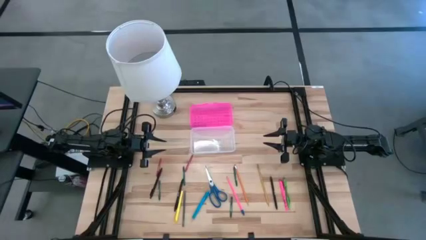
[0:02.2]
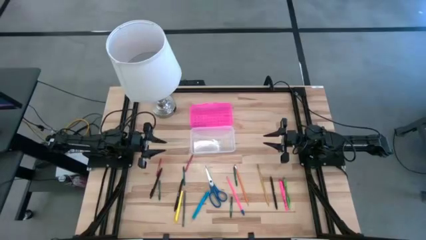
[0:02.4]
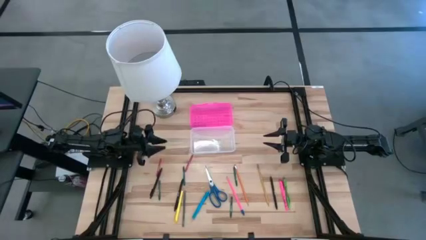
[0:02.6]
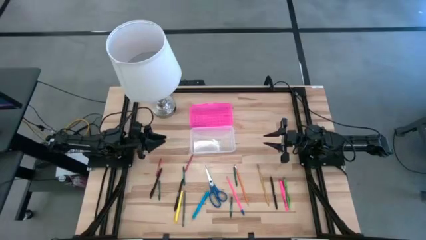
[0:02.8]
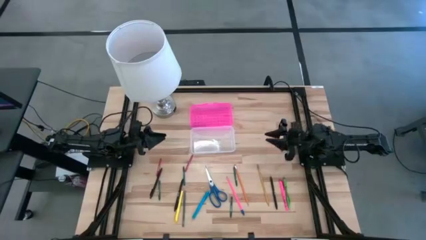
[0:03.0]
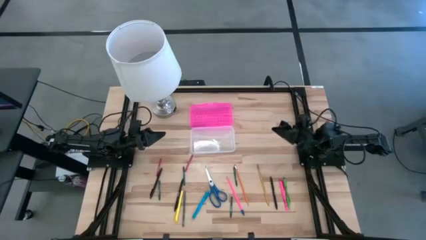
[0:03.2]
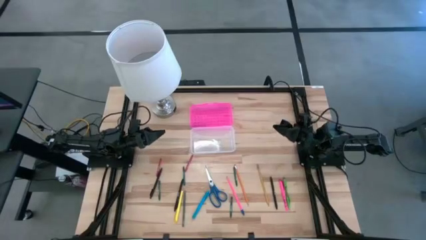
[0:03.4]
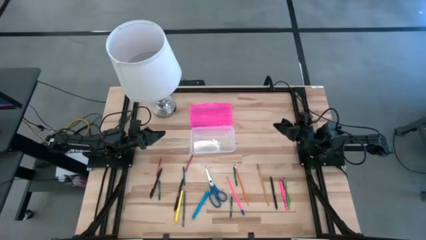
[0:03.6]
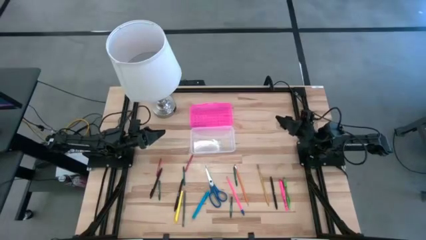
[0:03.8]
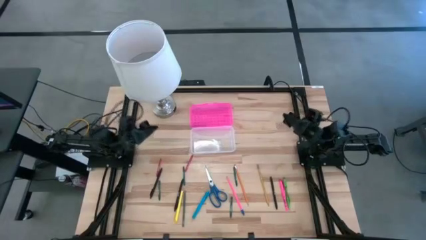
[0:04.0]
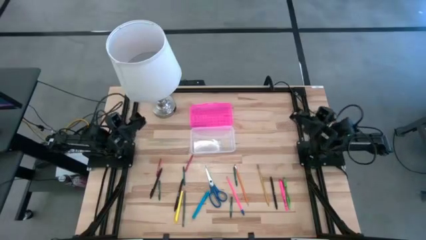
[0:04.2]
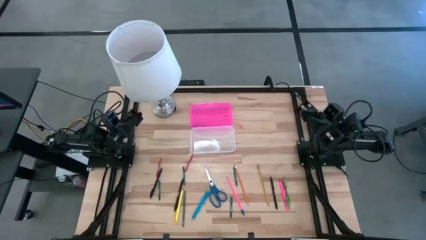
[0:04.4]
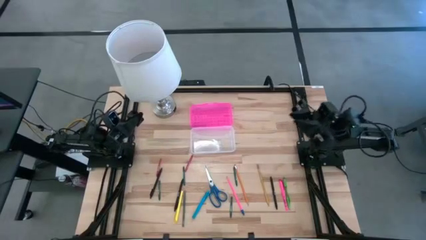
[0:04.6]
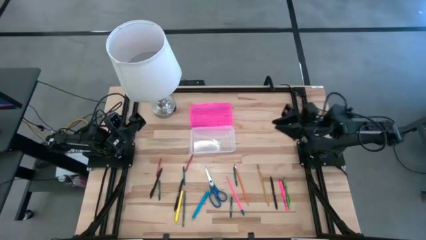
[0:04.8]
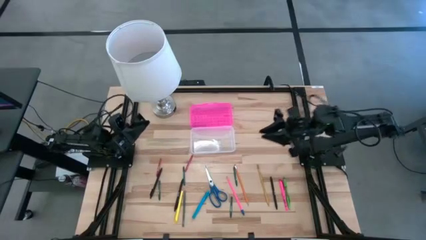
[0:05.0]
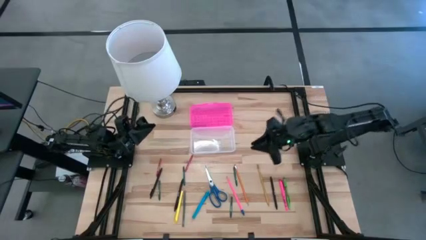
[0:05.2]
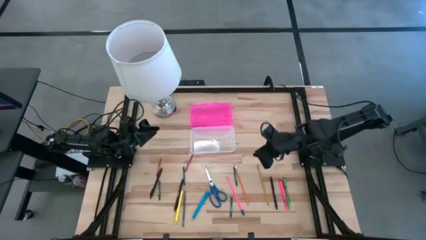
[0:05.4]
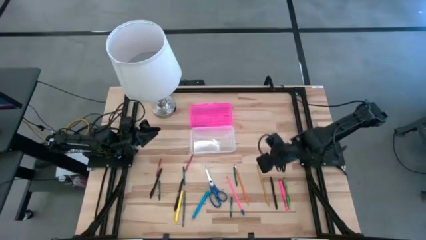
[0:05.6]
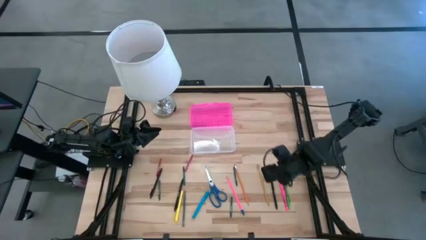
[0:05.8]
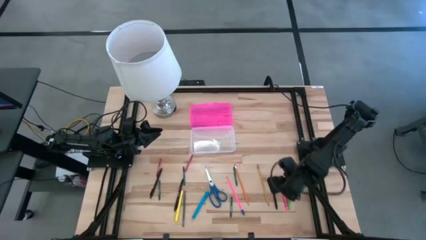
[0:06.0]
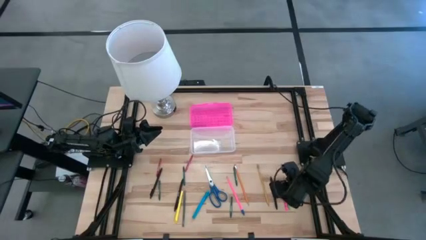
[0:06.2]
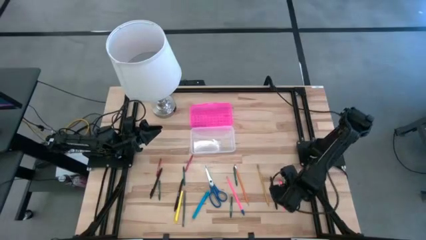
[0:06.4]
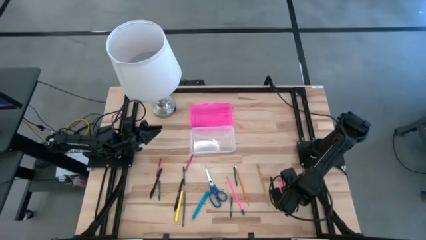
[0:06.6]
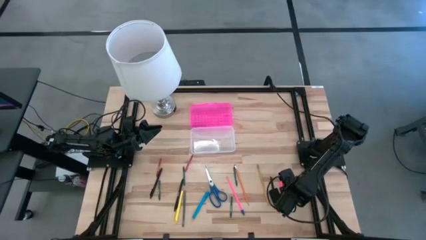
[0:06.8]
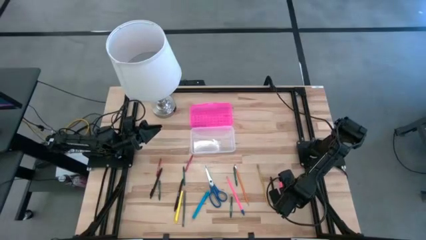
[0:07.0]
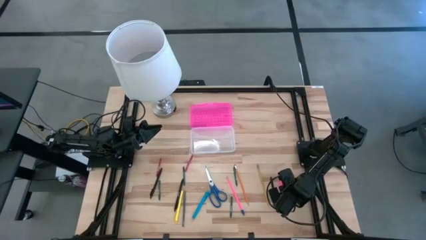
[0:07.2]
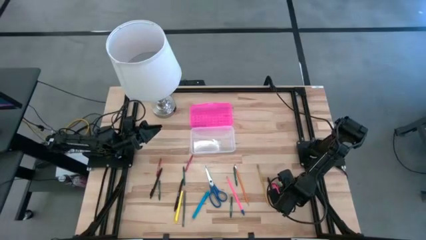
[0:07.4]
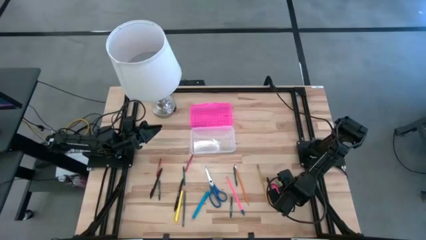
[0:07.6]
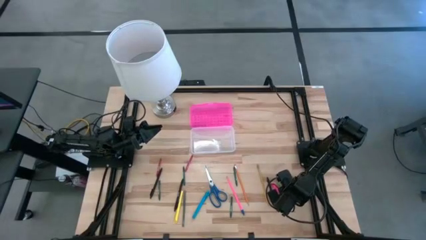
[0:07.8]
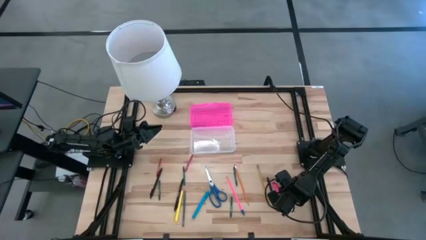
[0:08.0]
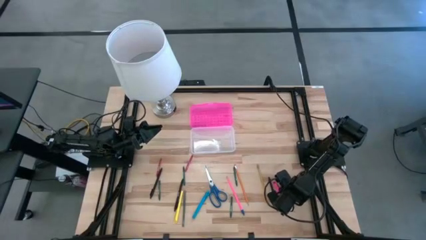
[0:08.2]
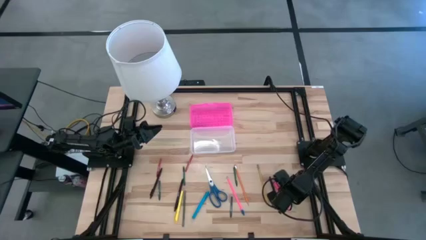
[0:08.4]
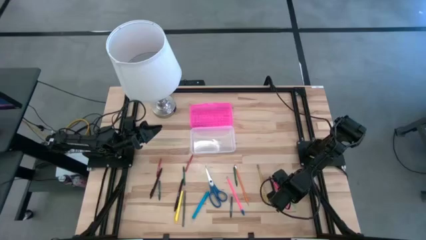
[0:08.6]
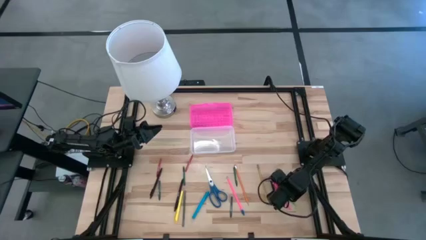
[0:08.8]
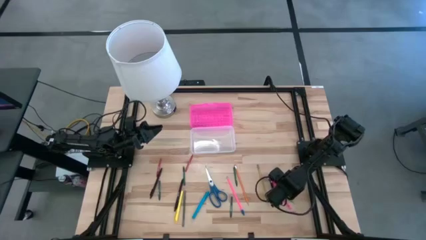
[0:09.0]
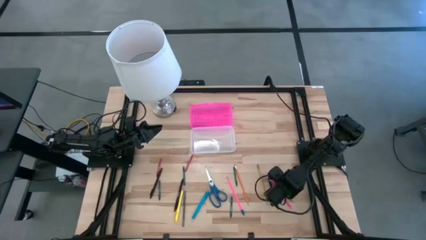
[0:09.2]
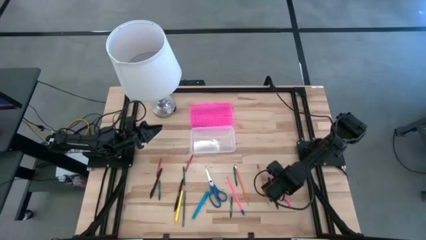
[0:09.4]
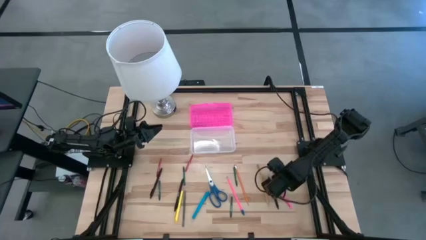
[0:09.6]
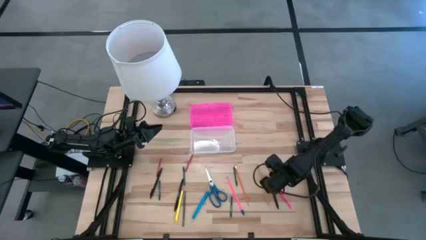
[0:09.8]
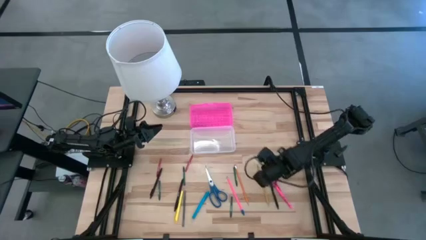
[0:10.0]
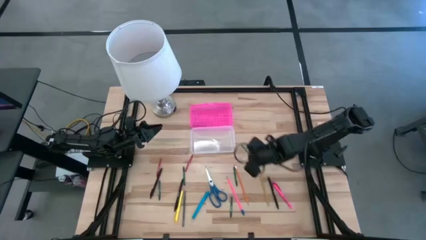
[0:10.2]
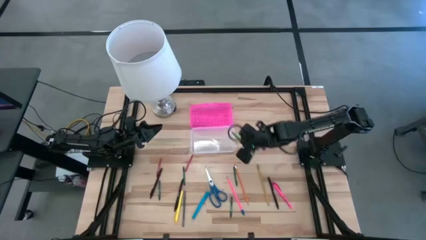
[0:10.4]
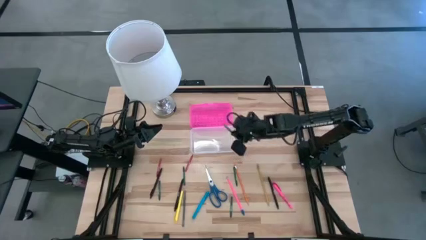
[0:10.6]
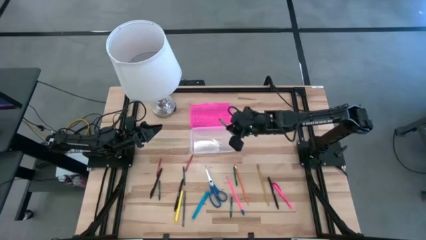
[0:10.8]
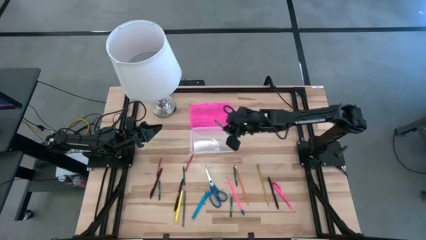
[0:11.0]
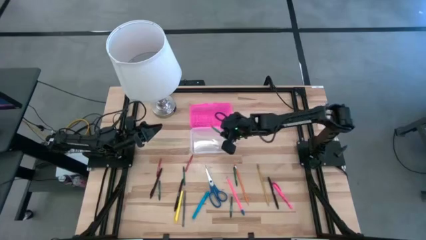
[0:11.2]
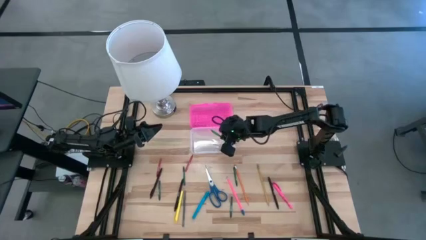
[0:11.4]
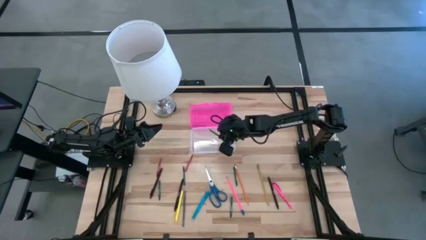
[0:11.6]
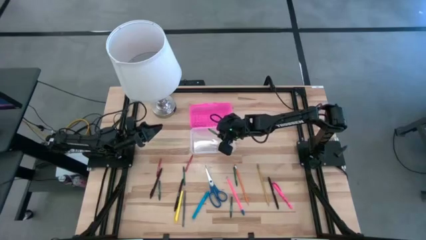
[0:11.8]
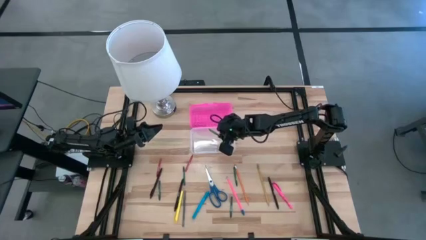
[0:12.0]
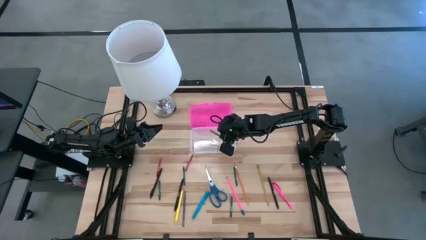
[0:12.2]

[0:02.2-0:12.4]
Task: Pick & place school supplies into a supply box
Put the green pen into the supply box

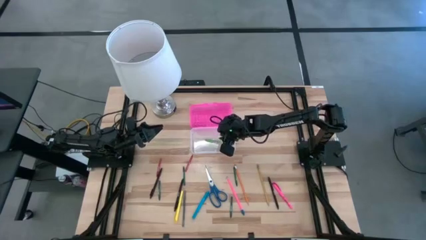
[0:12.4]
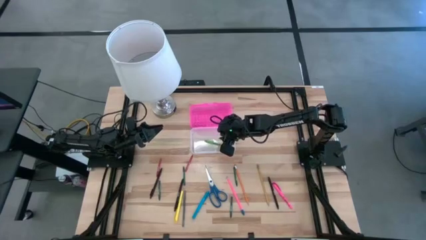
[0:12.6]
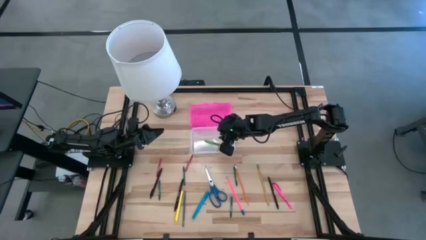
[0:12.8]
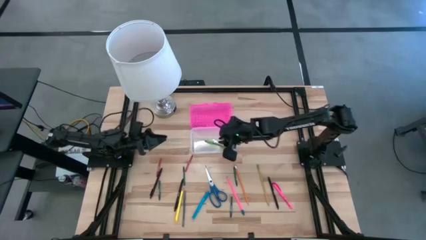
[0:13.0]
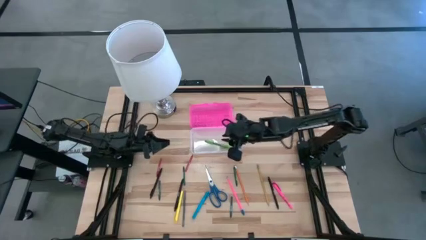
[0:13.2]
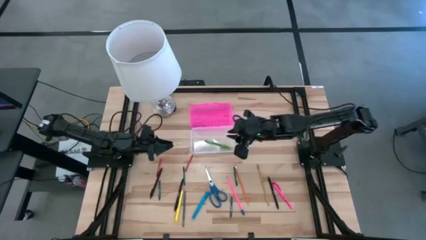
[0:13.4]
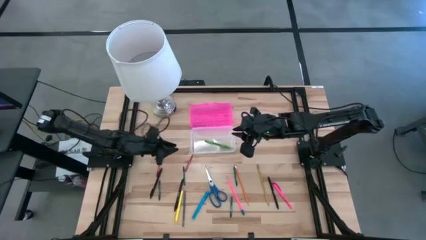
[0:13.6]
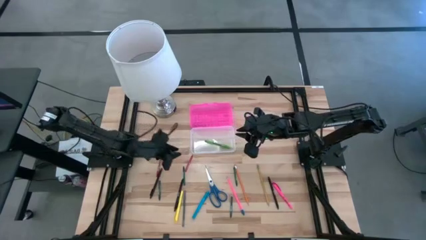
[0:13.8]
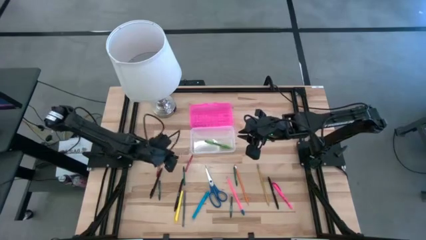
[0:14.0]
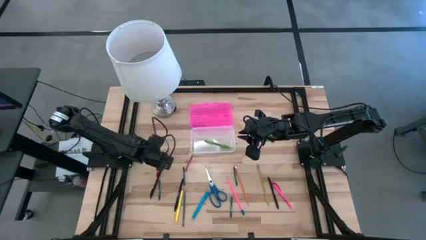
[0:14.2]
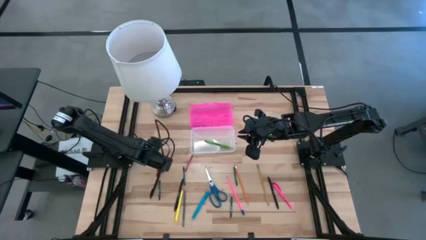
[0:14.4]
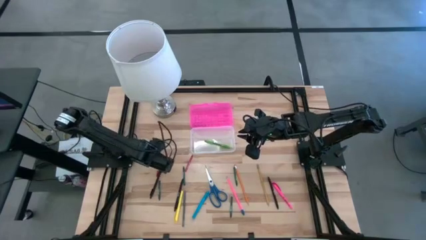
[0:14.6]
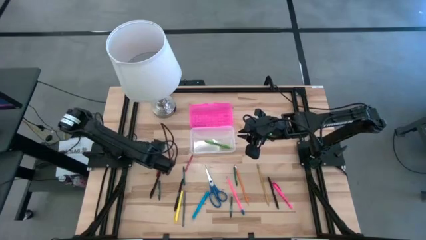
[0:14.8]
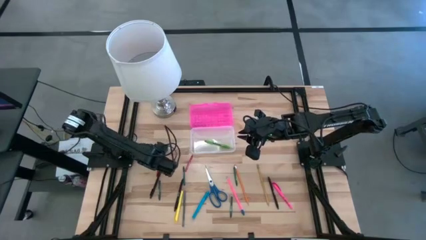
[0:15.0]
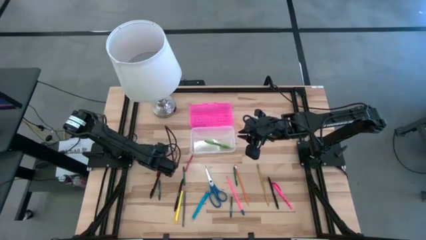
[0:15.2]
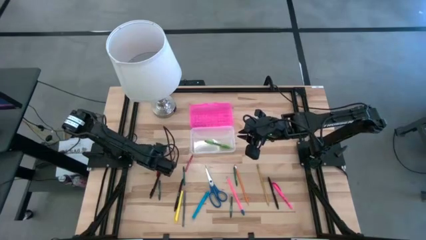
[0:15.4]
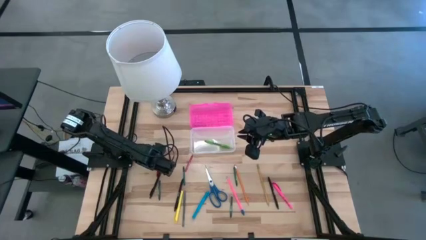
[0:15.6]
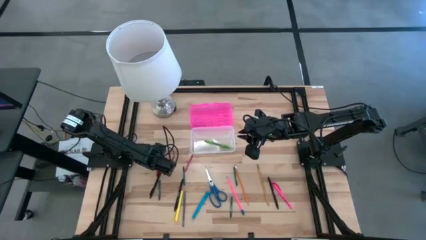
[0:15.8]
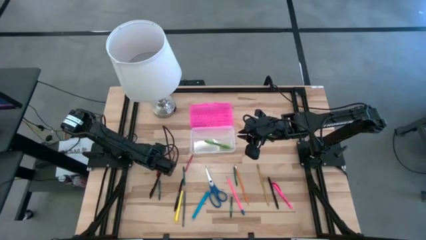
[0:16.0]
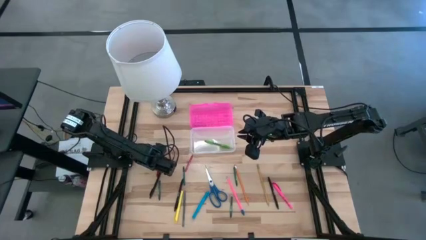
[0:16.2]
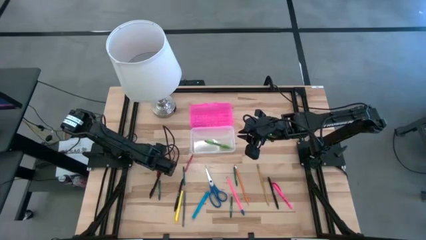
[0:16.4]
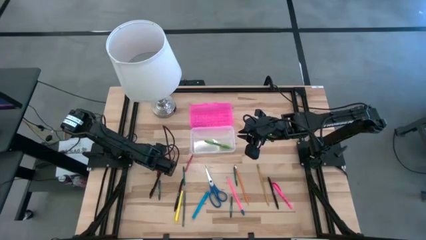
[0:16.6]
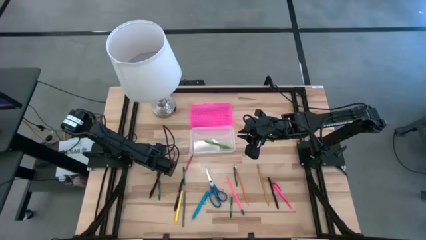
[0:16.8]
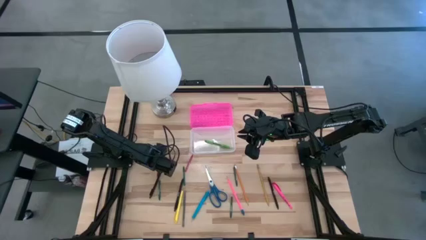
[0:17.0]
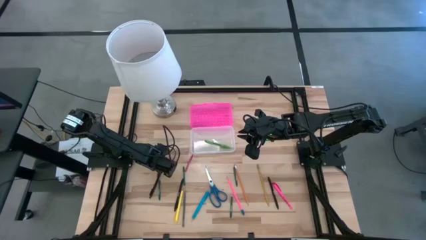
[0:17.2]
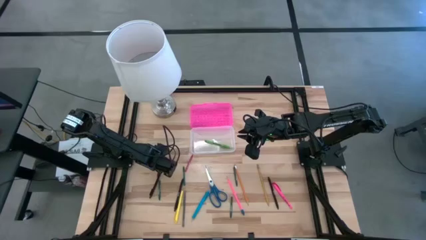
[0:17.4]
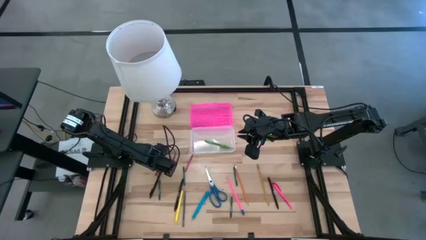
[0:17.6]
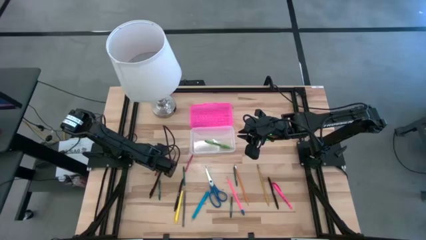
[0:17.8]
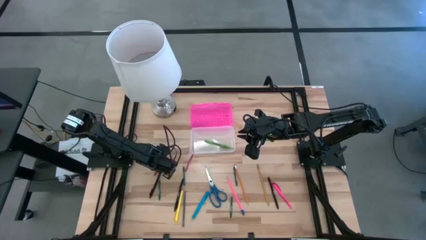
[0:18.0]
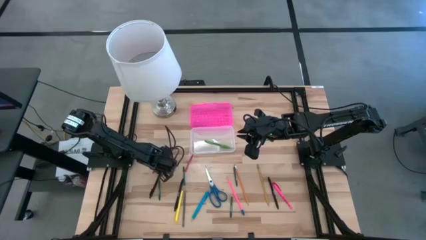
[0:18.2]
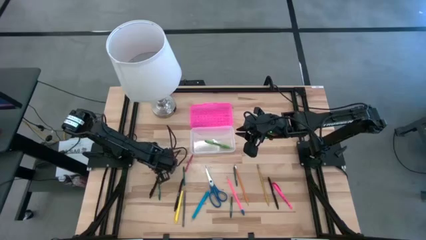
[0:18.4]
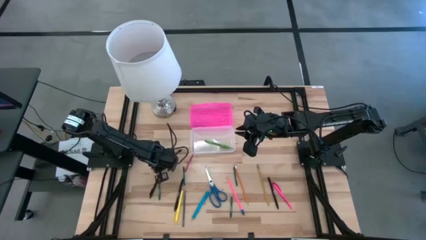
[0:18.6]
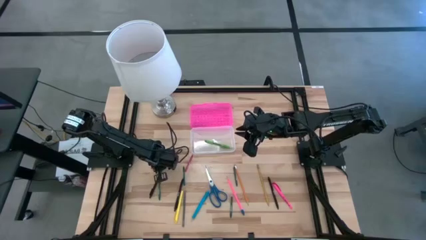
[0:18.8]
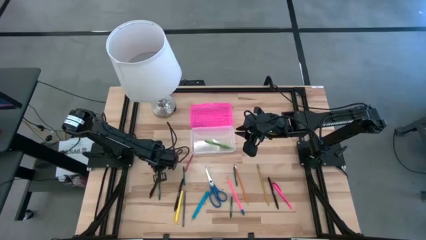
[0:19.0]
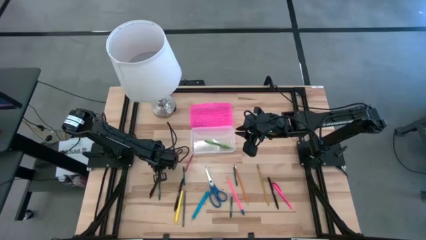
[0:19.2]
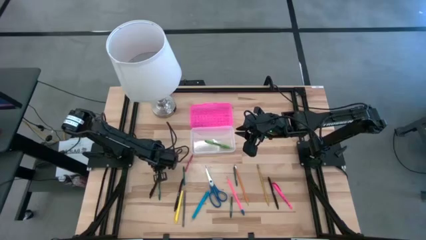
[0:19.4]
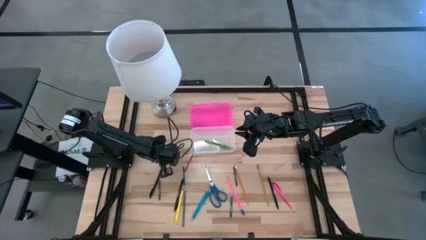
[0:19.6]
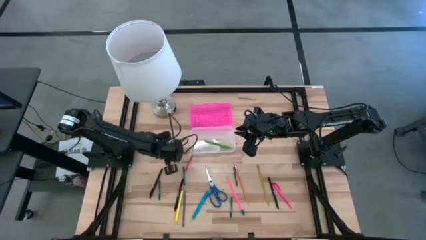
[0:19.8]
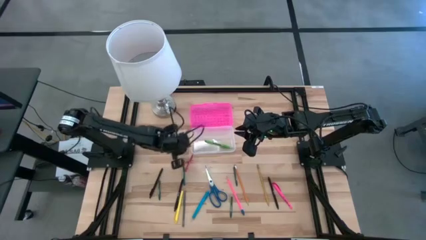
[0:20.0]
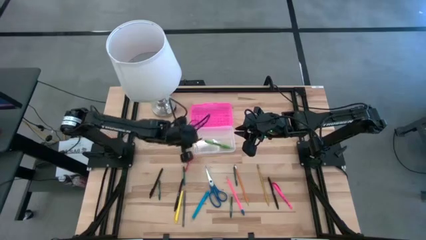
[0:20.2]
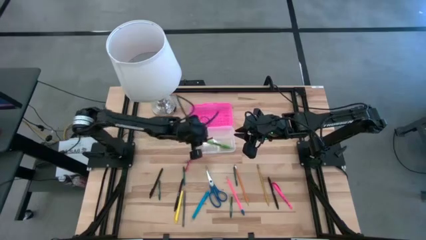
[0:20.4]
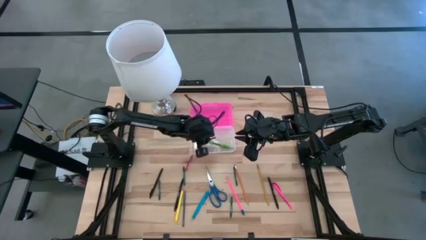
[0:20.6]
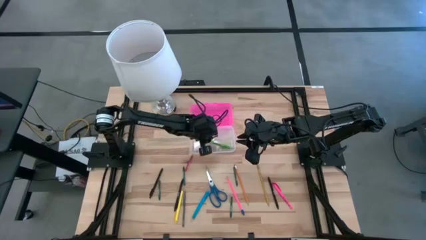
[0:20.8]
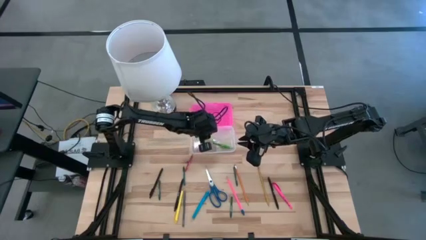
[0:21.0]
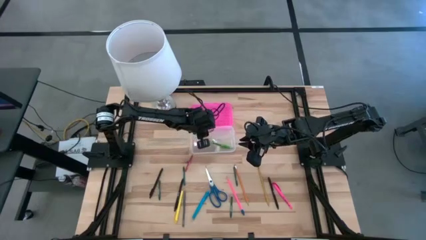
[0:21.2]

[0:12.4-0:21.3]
Put the left red crayon into the supply box
